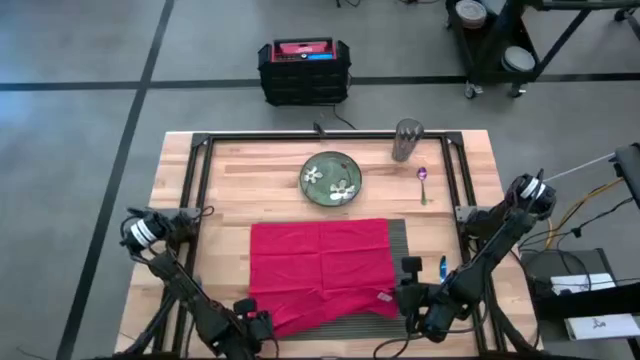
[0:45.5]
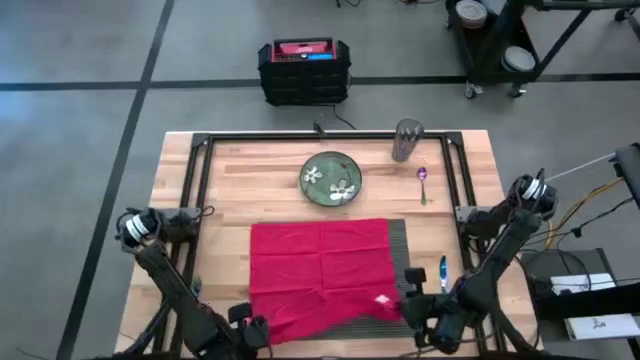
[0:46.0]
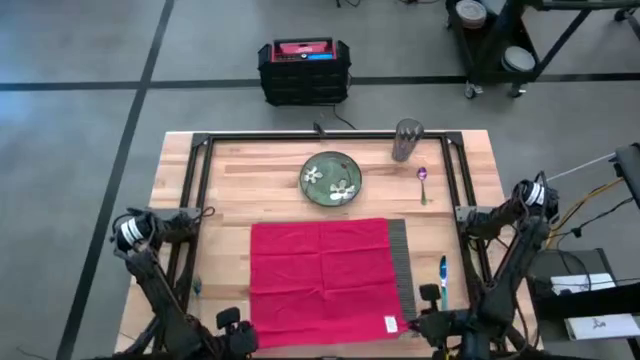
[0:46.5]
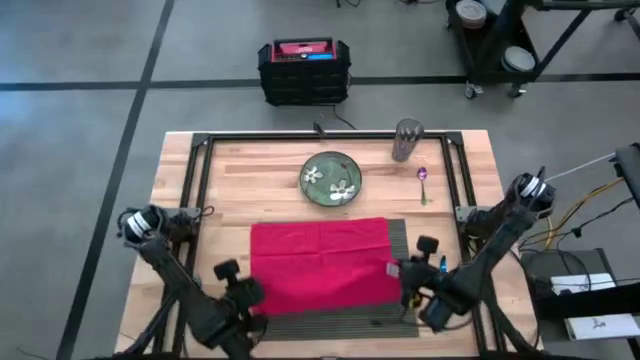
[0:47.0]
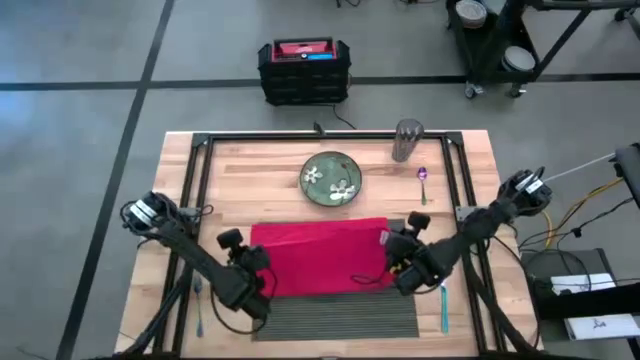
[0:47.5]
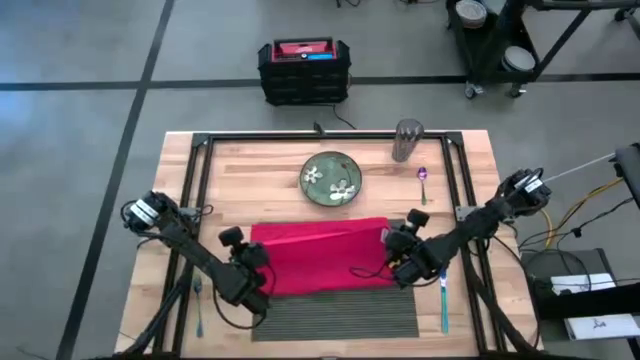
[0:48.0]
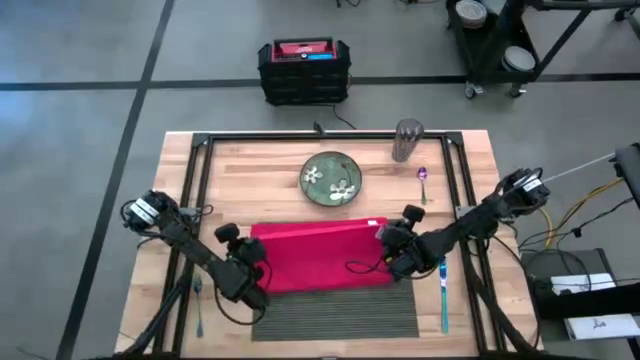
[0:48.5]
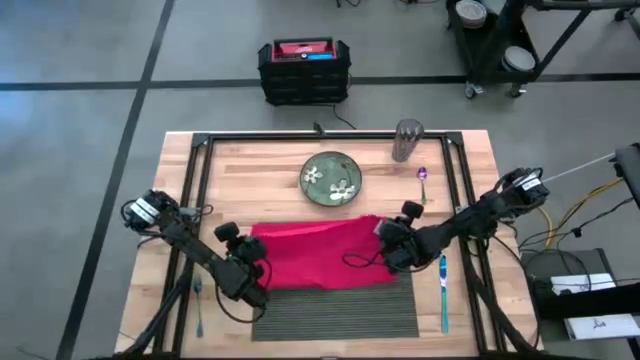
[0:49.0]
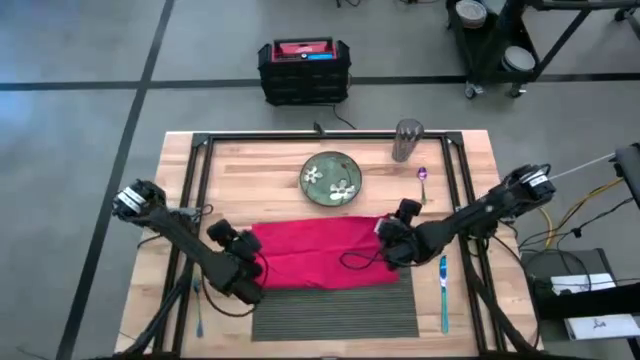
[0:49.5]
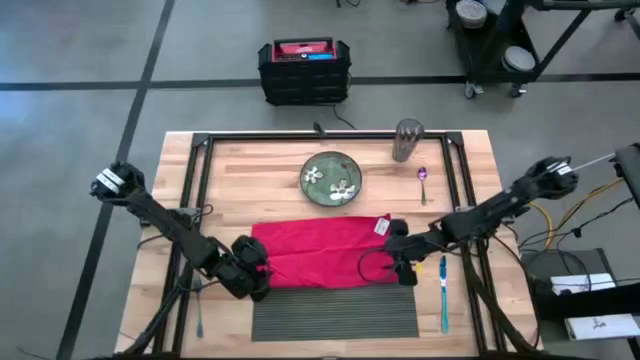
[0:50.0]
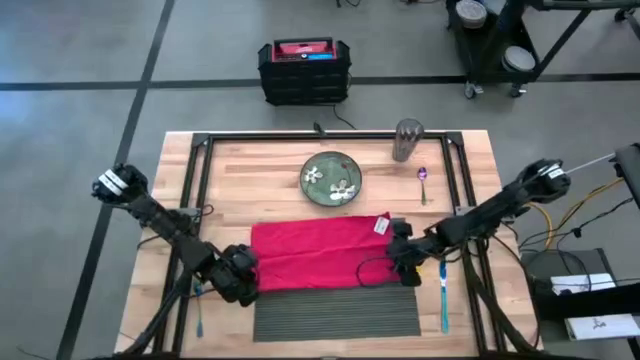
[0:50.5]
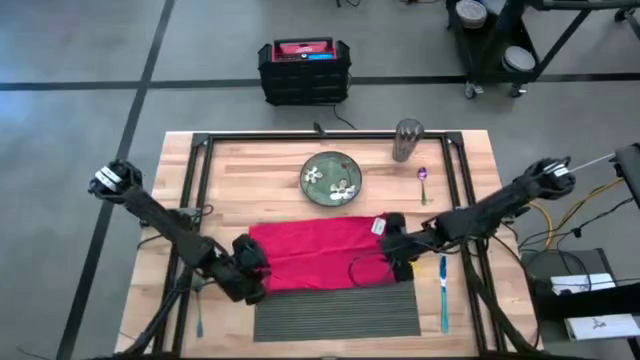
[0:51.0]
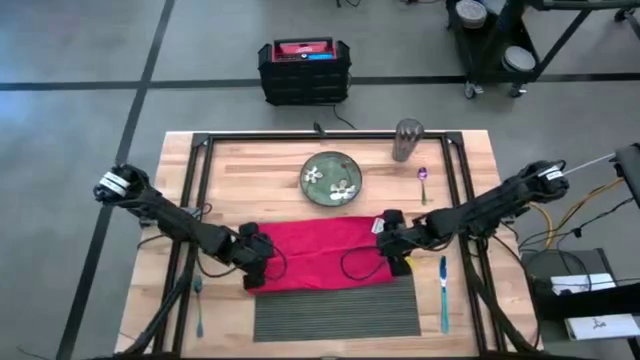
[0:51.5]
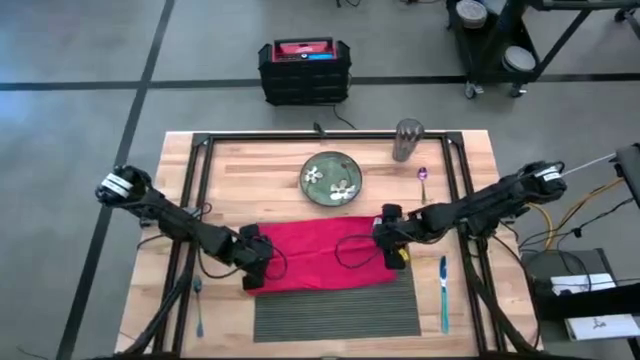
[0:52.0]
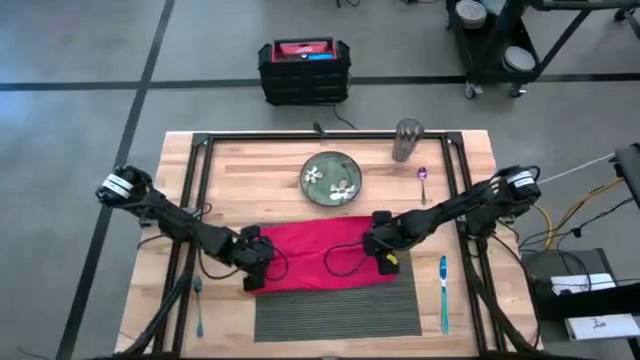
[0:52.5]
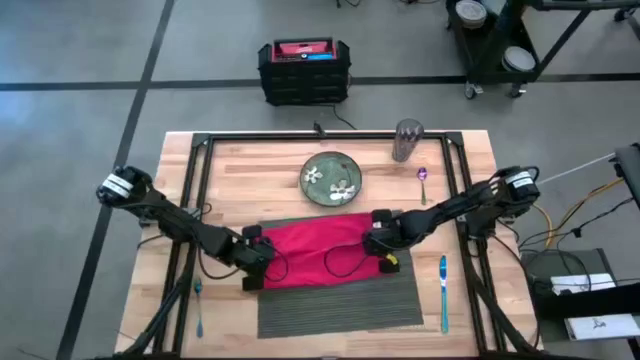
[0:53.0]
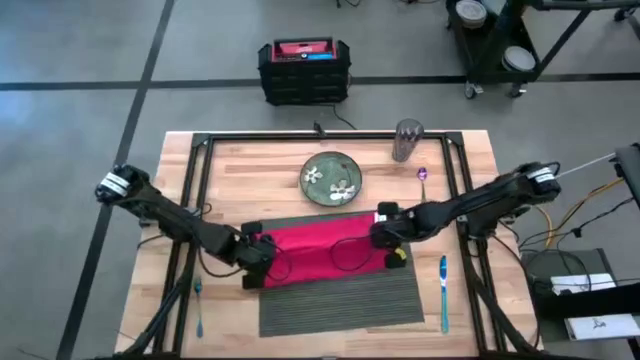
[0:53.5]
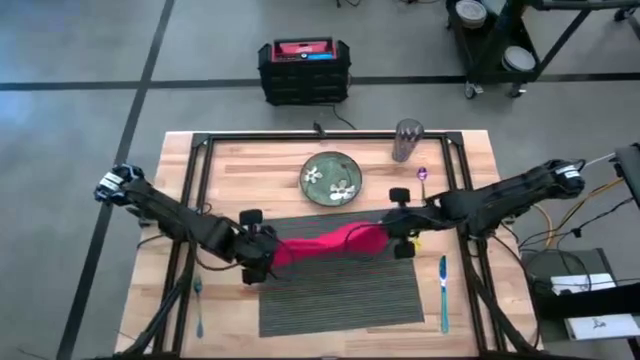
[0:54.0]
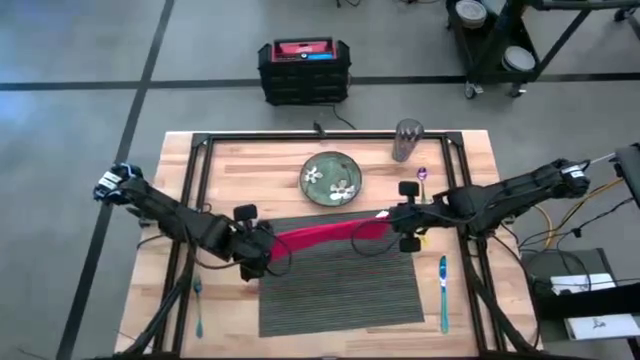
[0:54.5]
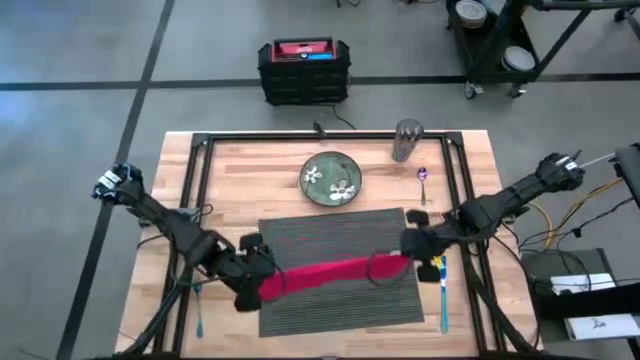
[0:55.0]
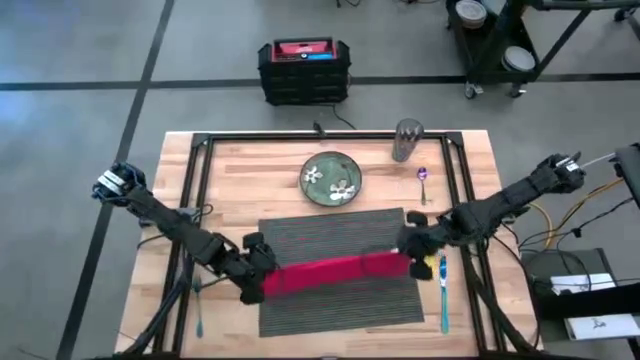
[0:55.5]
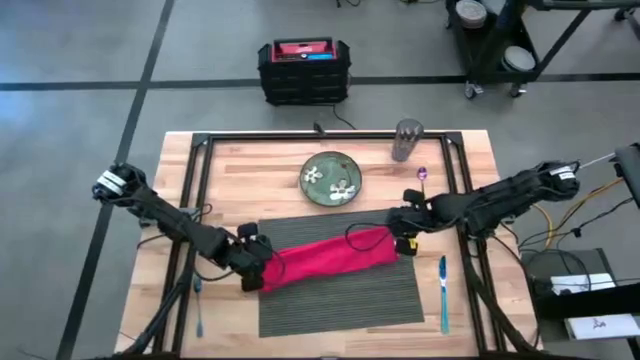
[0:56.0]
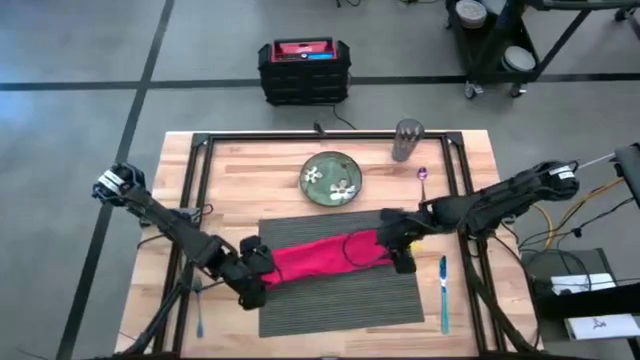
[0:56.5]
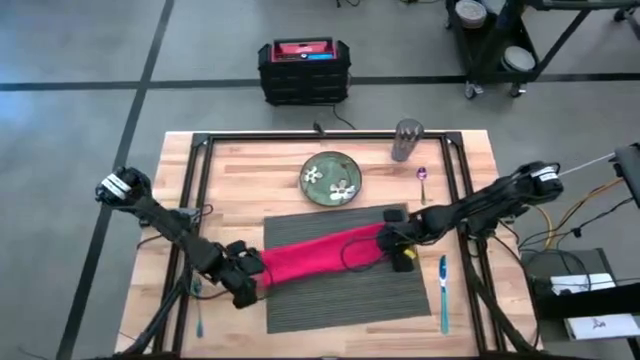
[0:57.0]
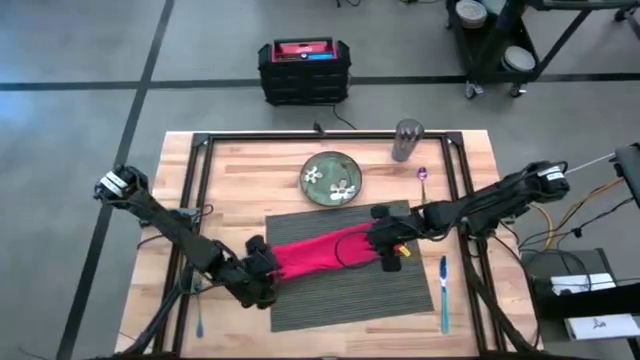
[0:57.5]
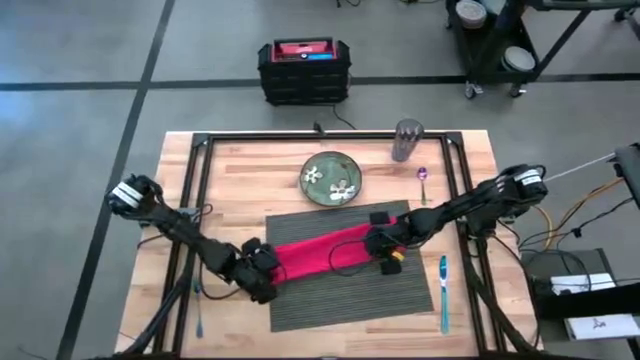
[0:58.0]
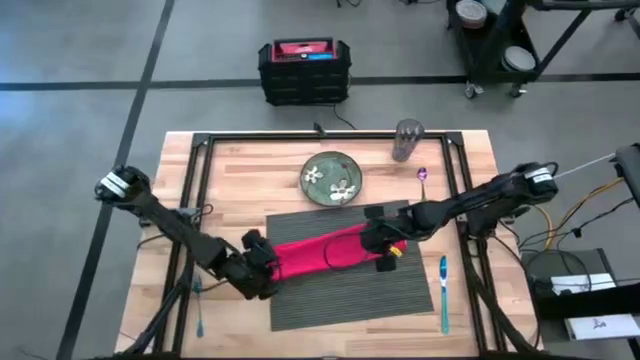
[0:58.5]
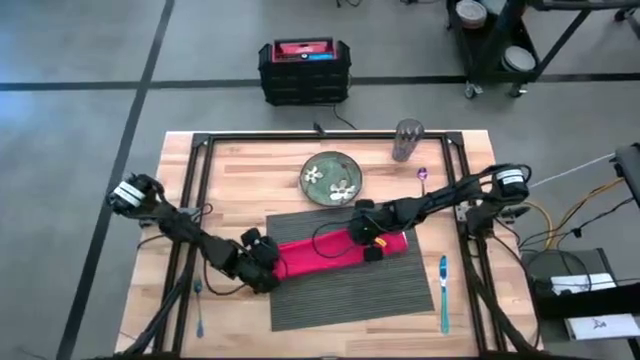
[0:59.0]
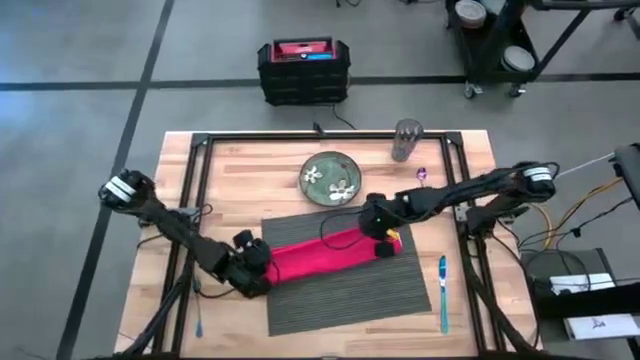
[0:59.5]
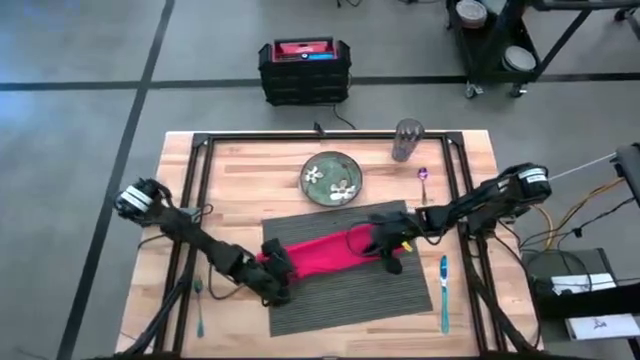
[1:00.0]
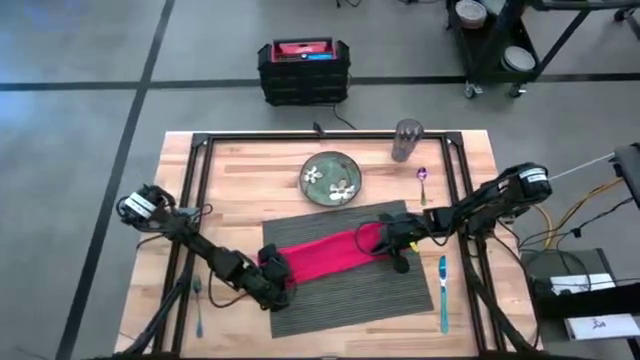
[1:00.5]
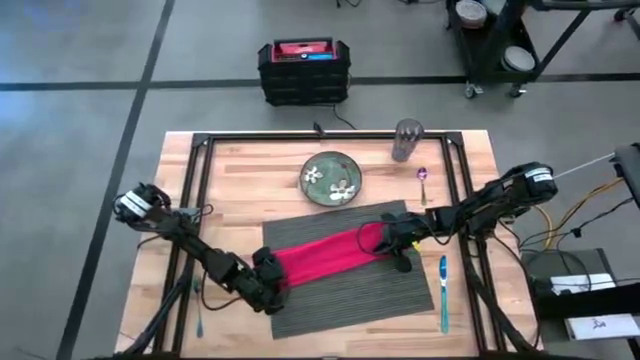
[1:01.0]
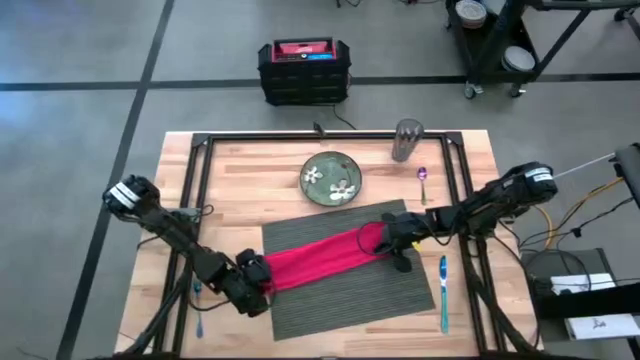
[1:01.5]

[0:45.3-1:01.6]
Task: Set table place
Fold the red table napkin

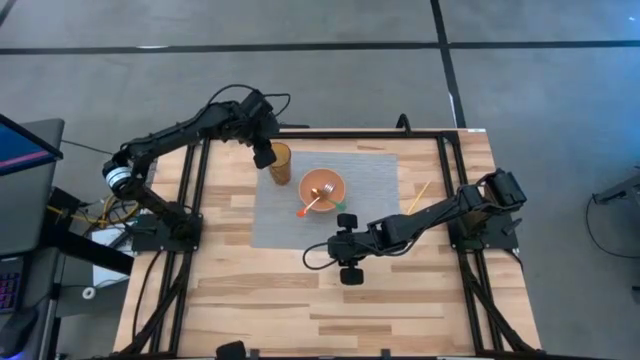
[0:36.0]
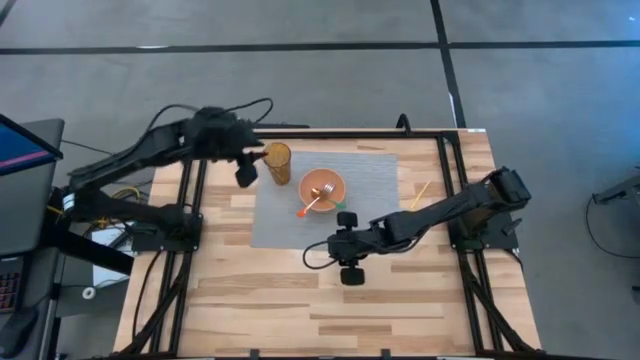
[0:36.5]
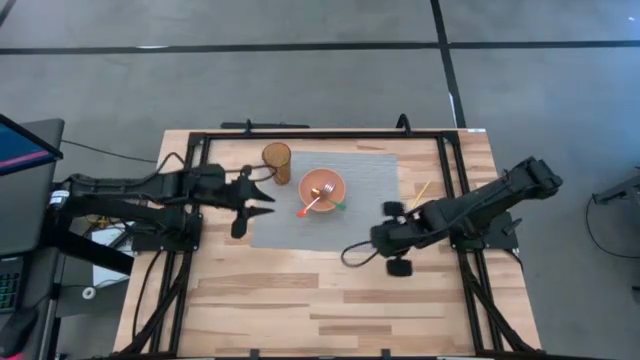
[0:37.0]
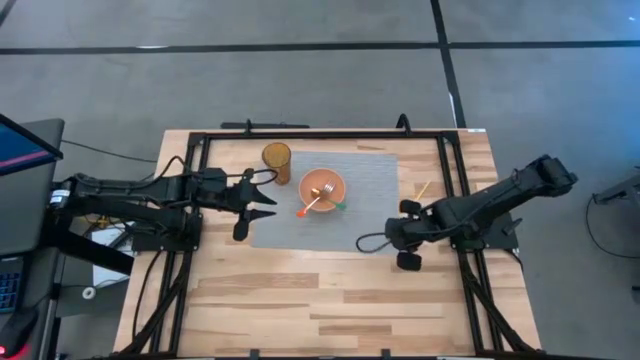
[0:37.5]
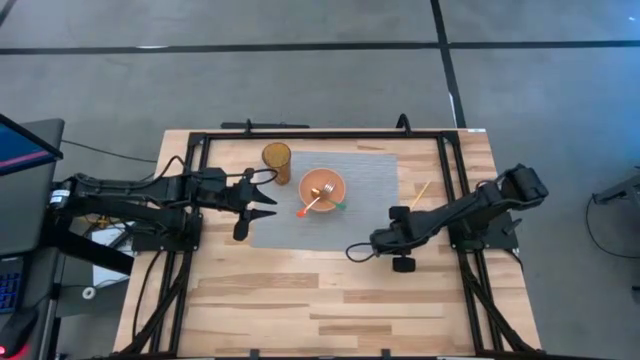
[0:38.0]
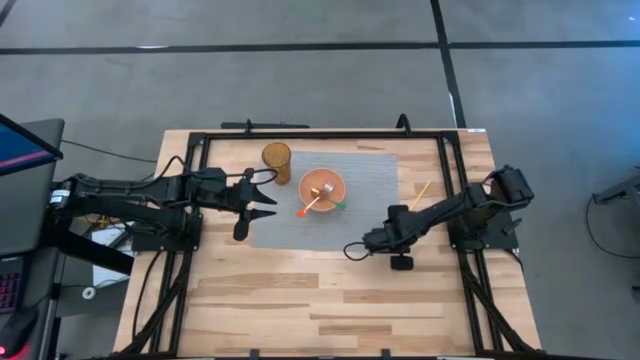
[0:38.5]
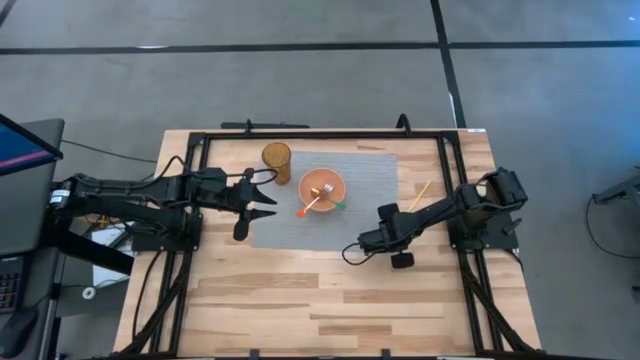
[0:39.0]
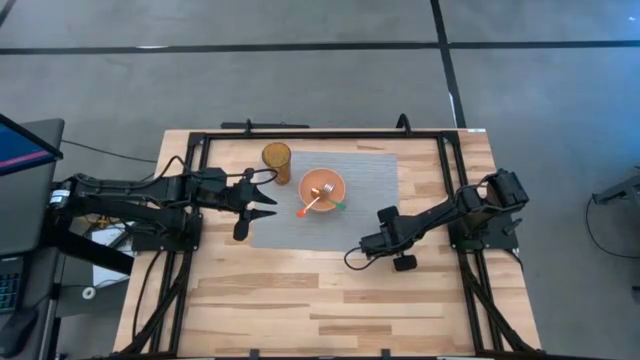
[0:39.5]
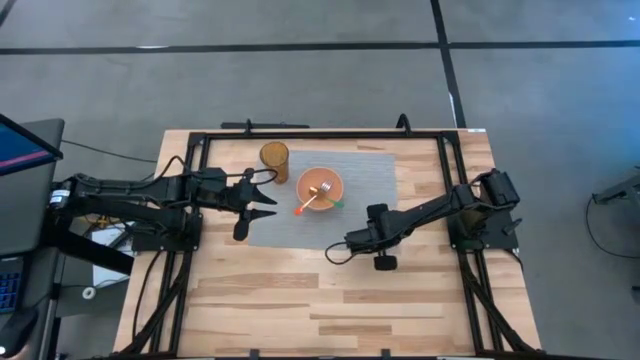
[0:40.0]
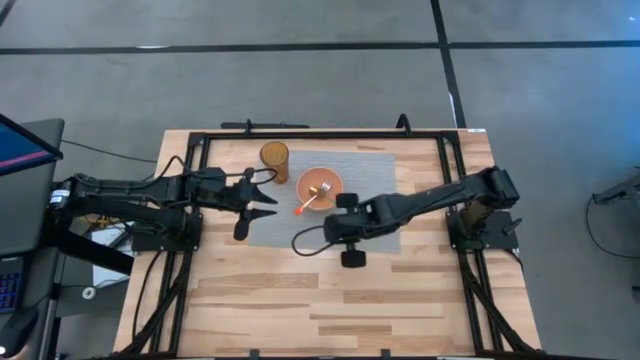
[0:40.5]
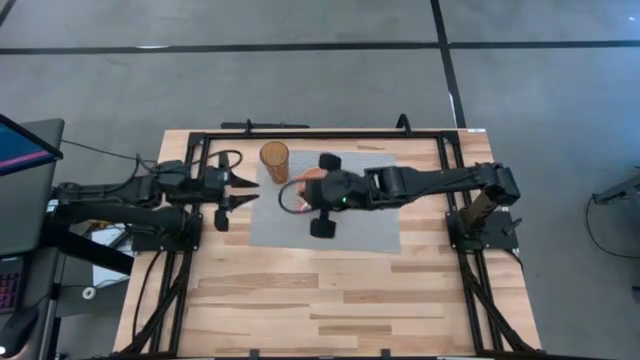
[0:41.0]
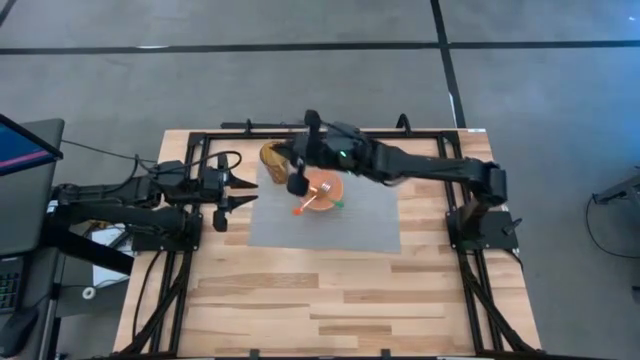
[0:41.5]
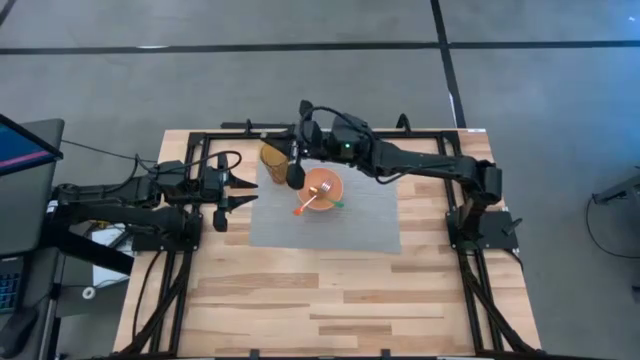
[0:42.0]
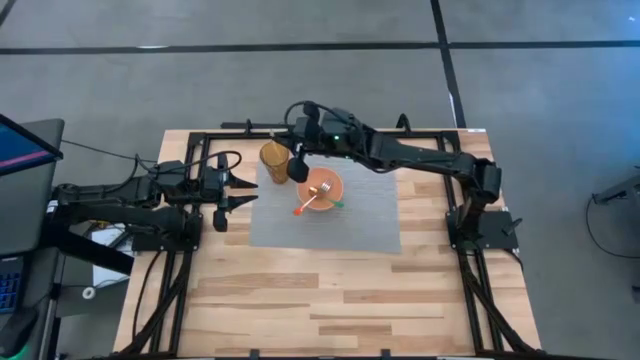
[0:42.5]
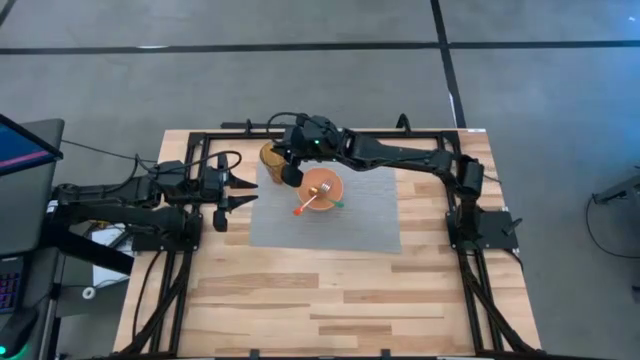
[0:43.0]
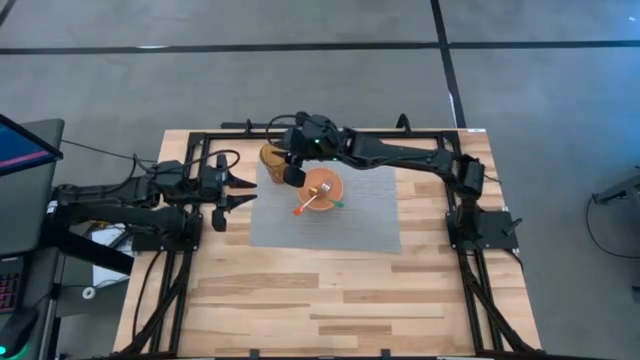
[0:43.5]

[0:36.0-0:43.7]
Task: Pick & Place Utensil
Put the yellow straw into the brown cup on the gray mat
